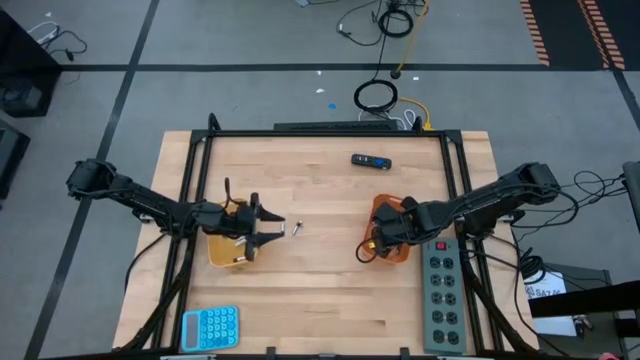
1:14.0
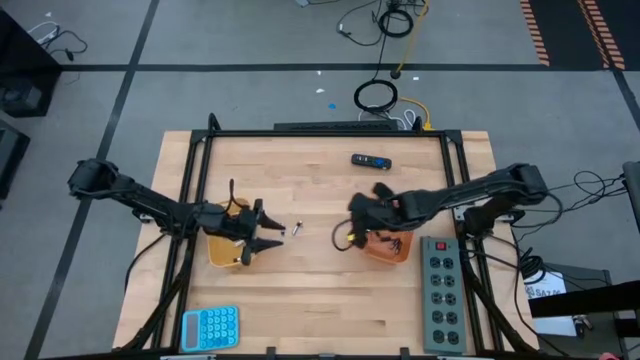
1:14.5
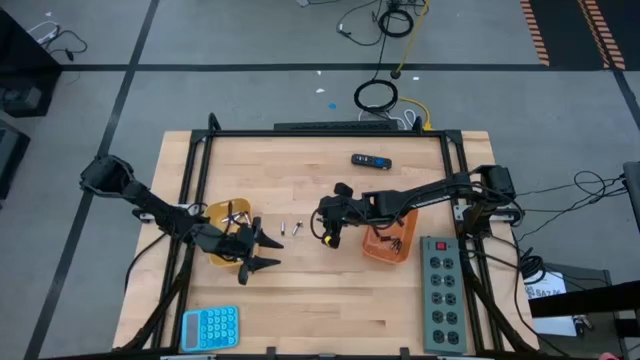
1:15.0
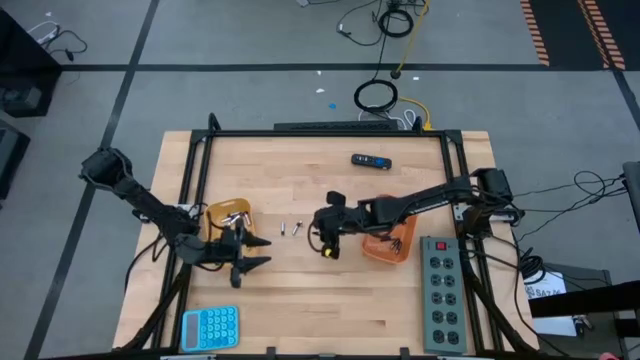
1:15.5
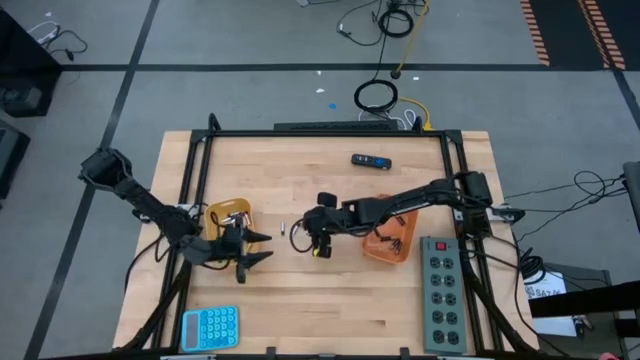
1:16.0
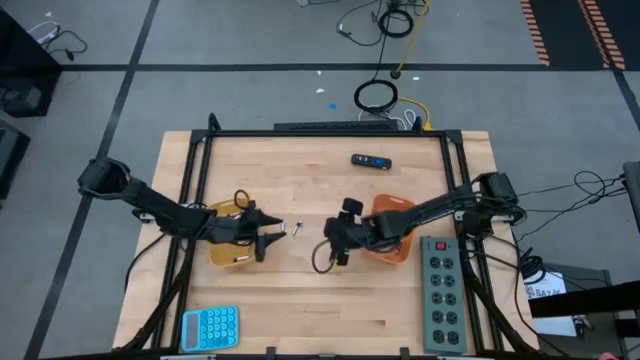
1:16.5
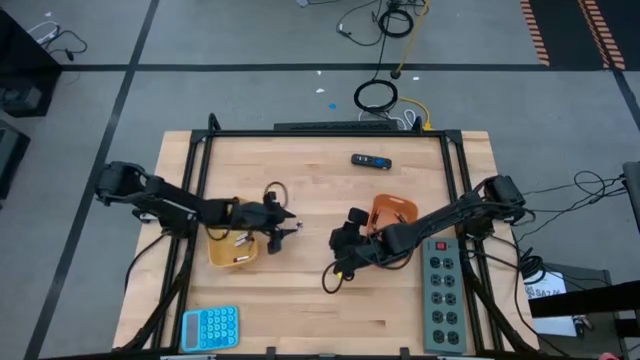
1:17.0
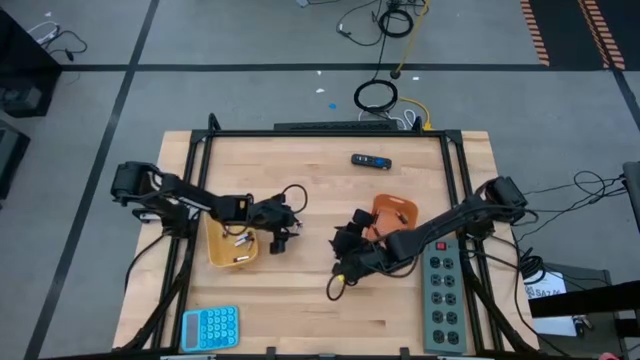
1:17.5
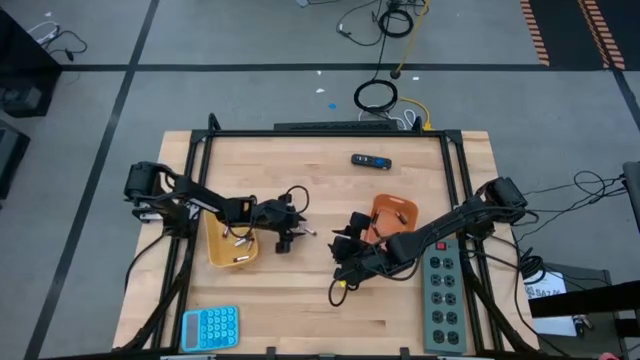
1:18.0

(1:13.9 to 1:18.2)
Task: Sort batteries
Put the silver battery into the yellow bin

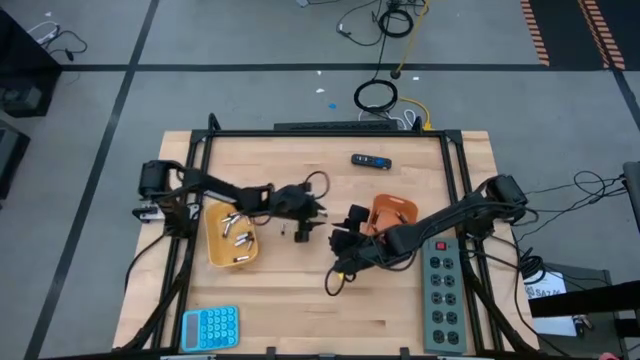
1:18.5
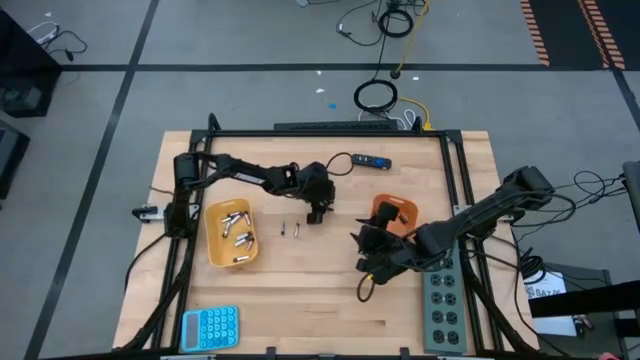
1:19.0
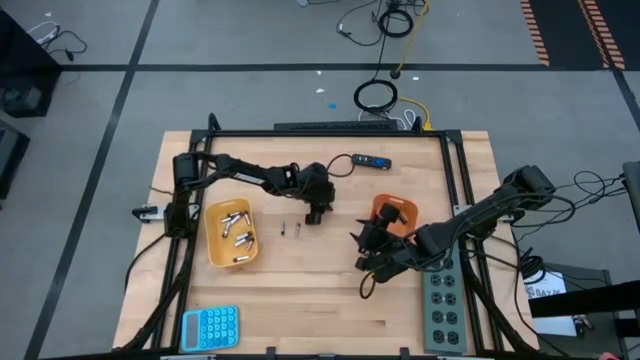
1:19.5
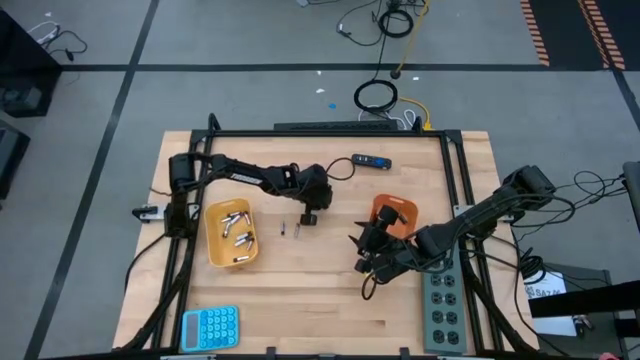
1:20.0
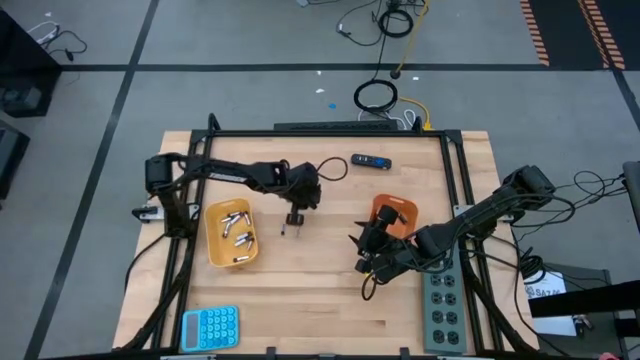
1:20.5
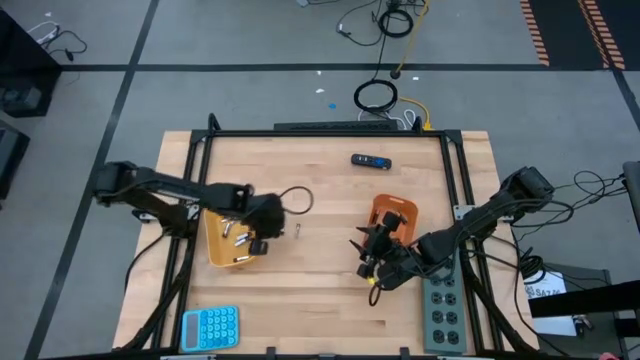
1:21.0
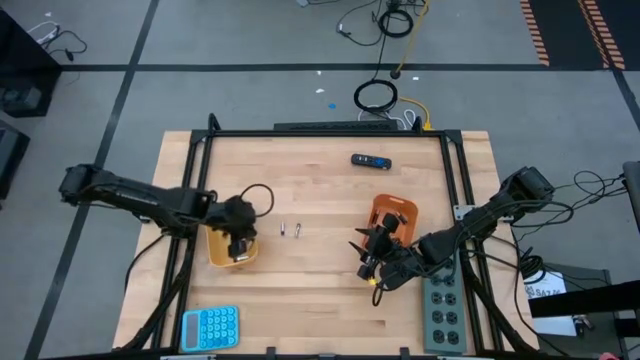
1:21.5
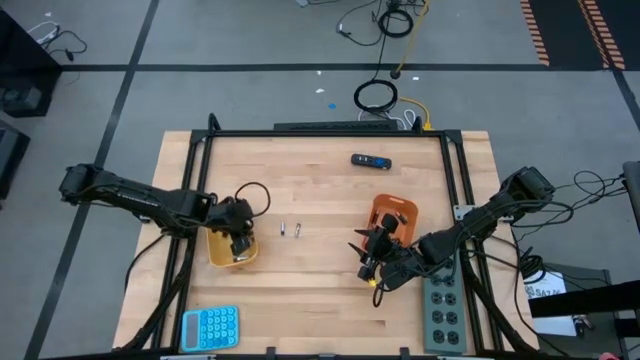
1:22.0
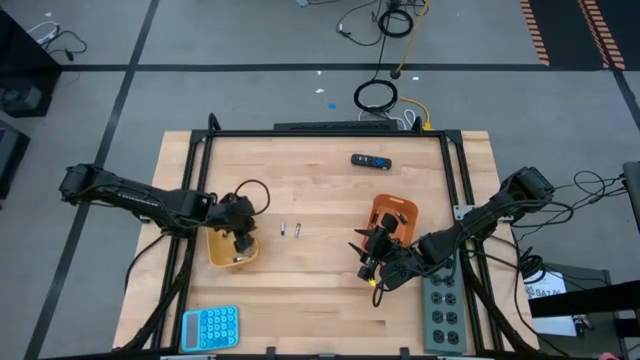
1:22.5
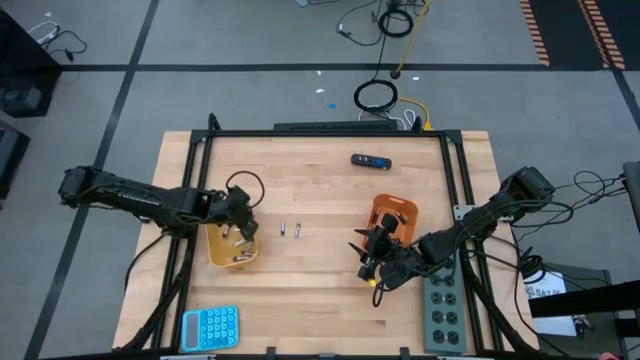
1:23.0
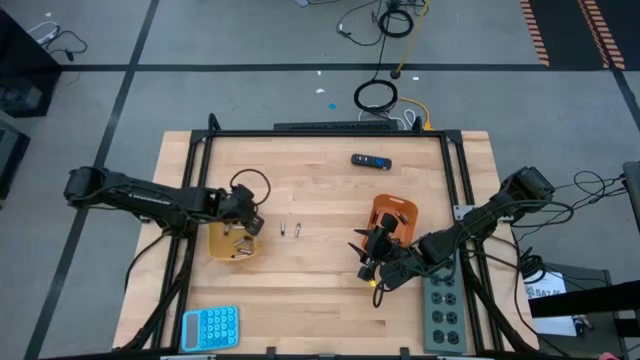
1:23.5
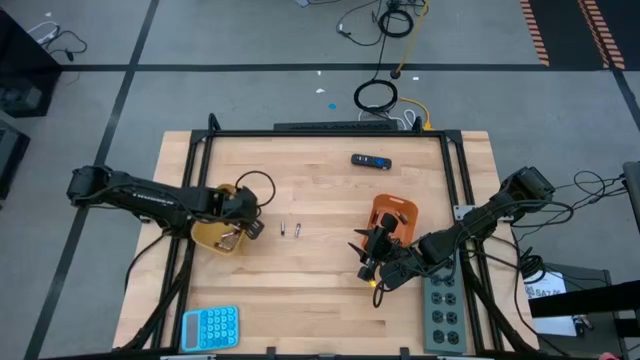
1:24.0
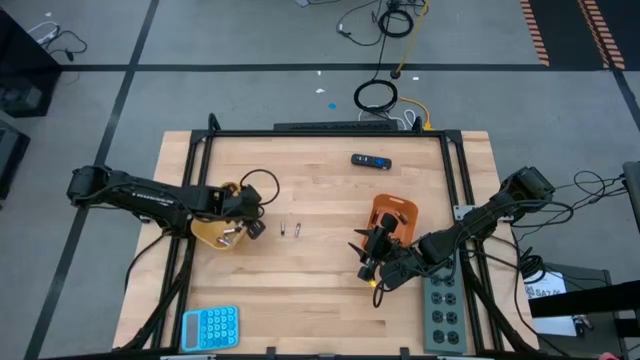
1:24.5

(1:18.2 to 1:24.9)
Put the silver battery into the yellow bin

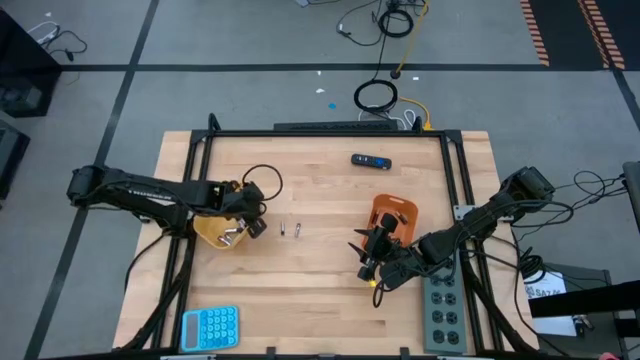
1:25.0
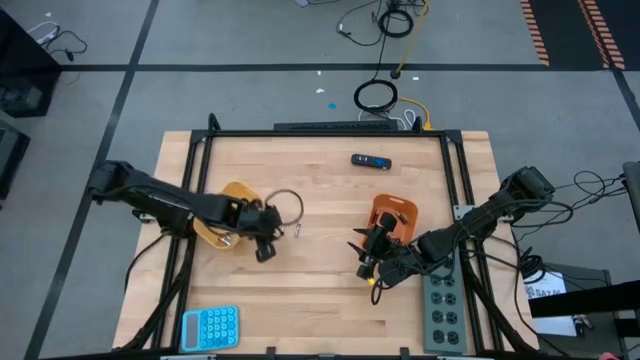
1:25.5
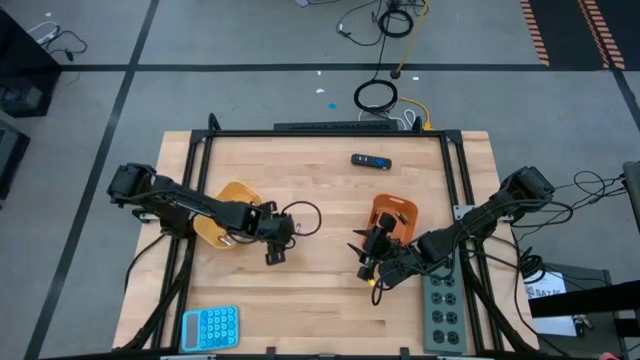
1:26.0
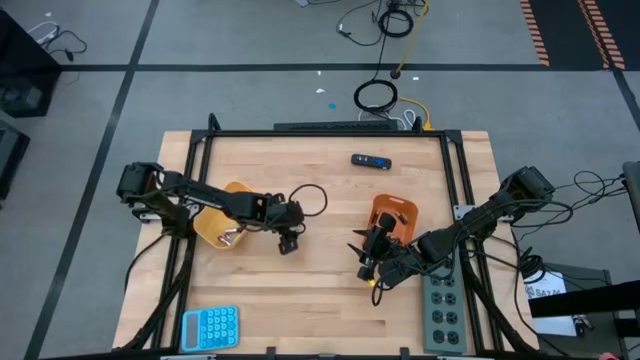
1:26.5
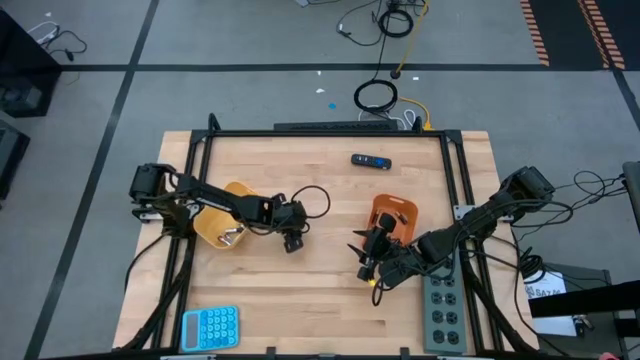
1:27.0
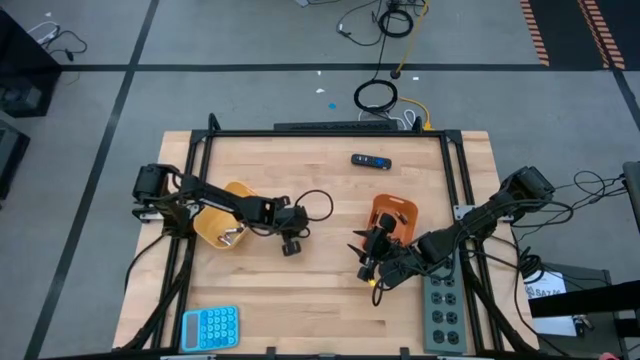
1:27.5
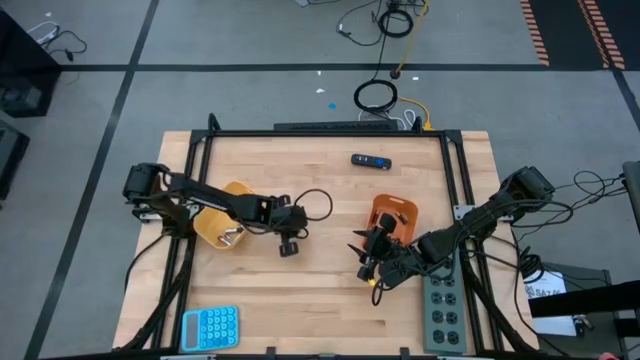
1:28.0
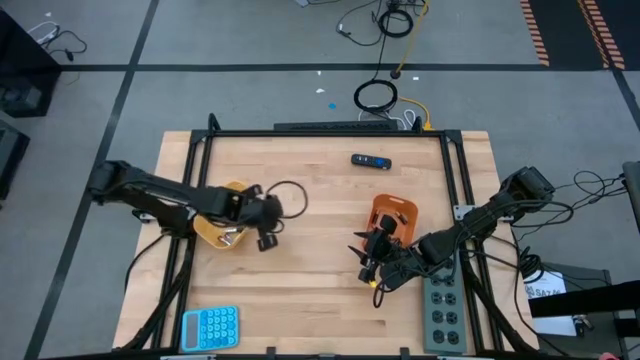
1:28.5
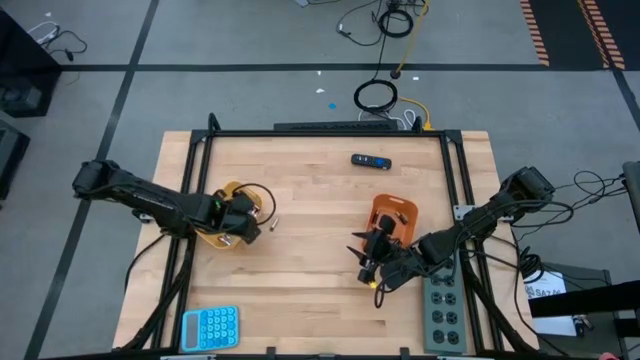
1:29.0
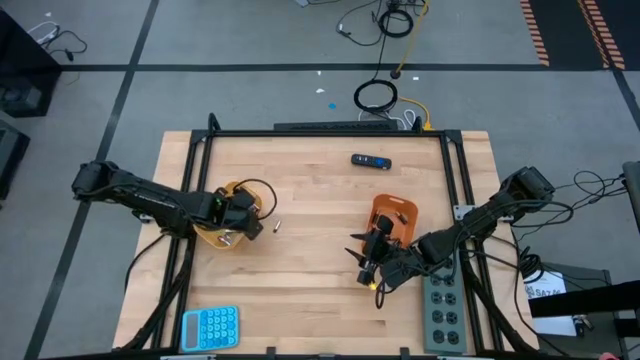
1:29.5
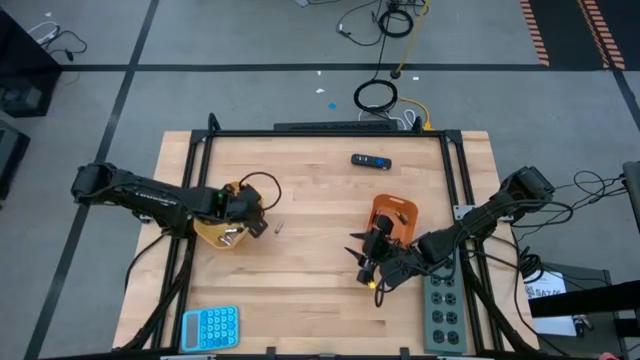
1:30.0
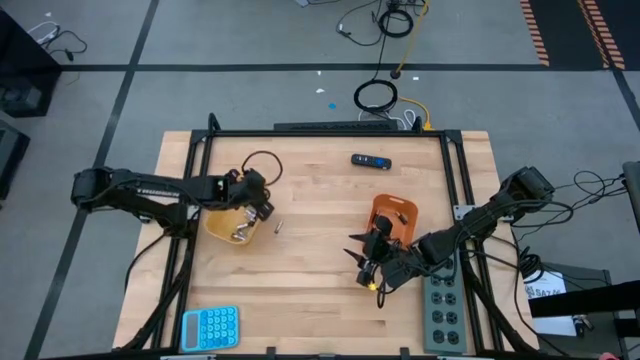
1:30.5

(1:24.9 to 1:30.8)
Put the silver battery into the yellow bin

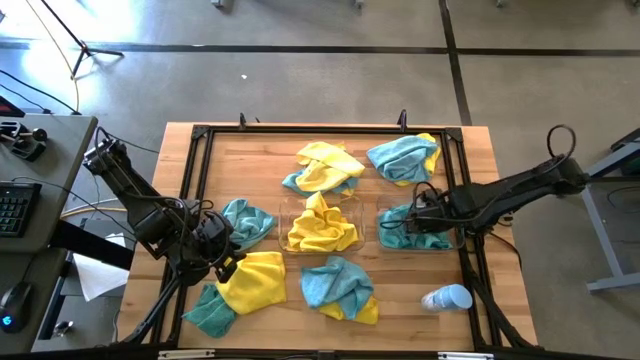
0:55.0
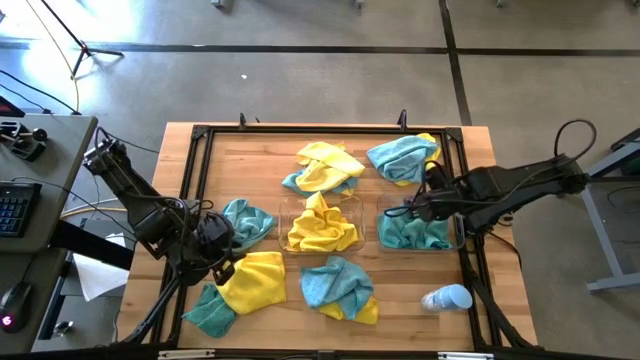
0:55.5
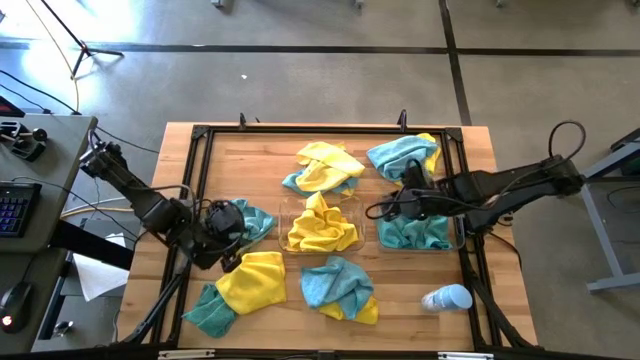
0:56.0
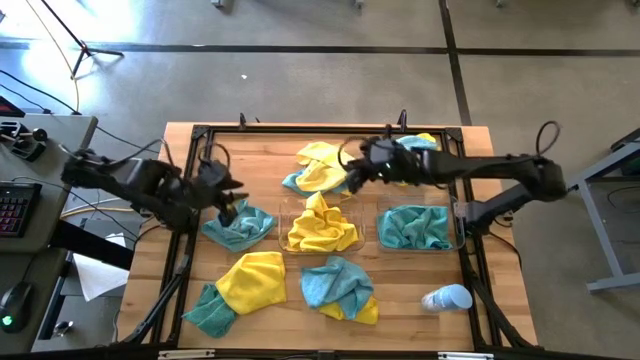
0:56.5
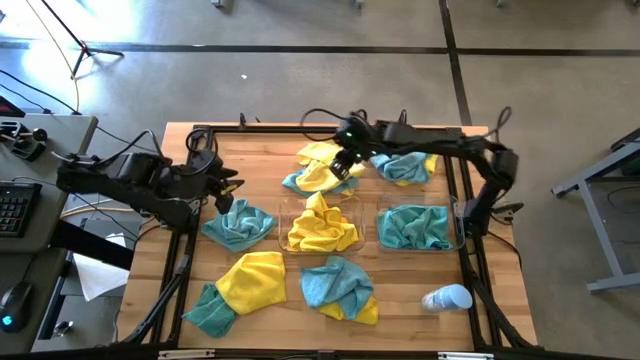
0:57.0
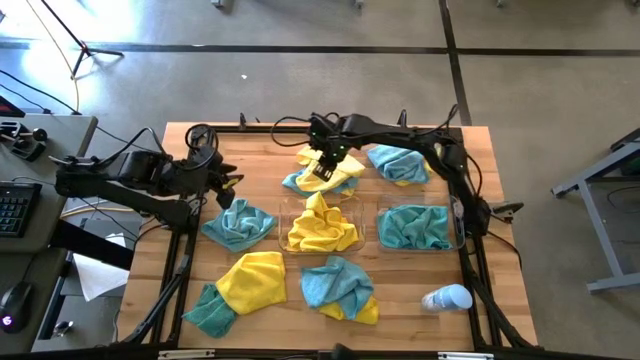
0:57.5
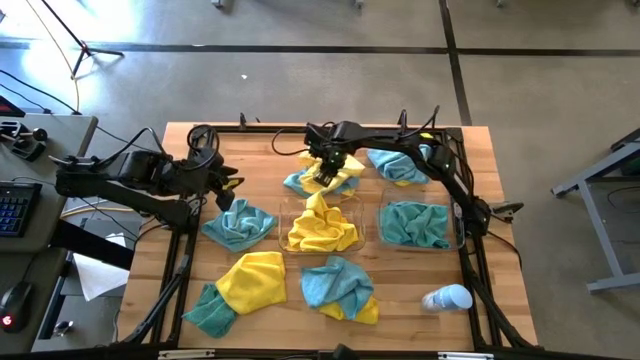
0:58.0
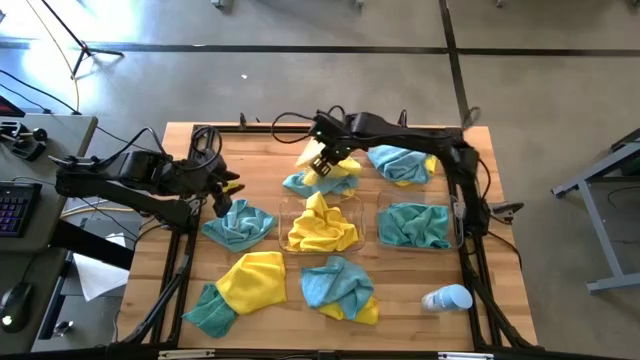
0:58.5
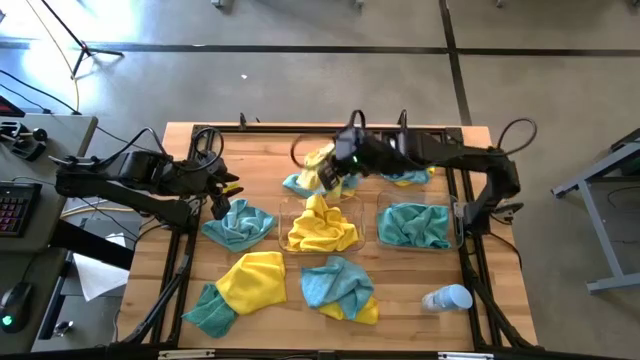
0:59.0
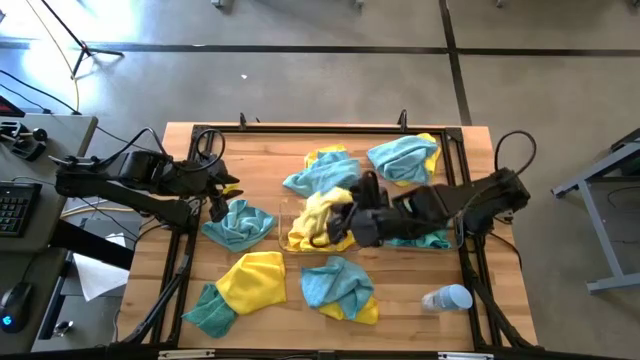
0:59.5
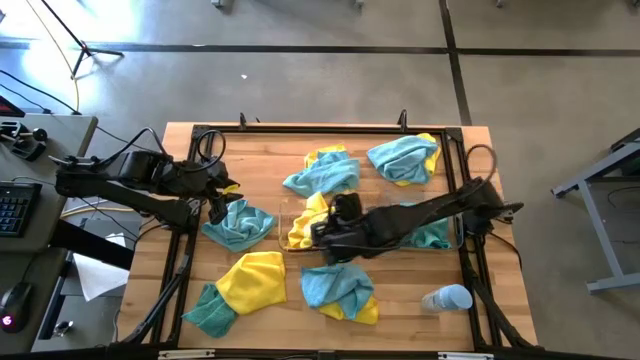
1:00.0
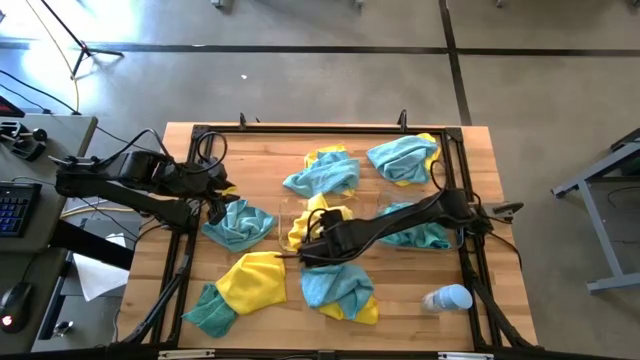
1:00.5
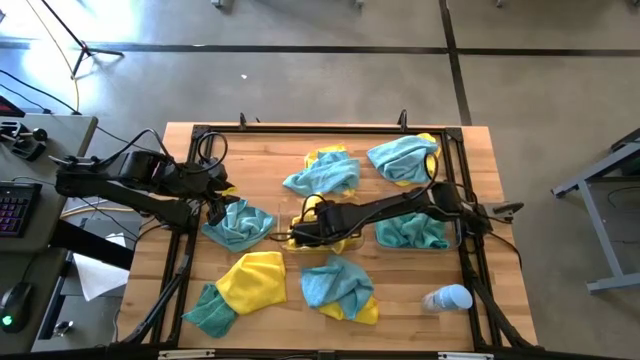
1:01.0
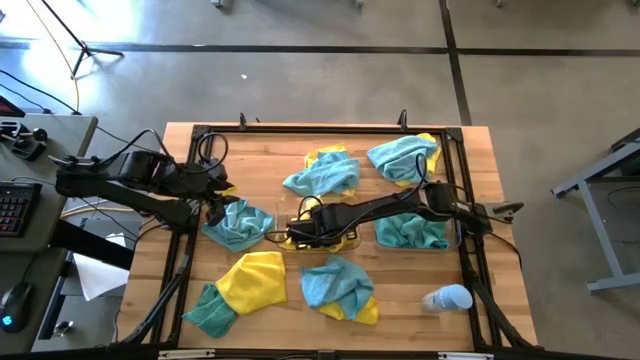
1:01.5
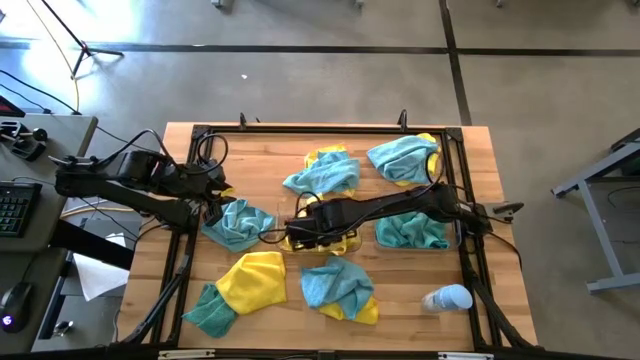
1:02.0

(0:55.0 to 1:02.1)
Task: Sort microfiber towel by color & place in baskets
Put the yellow microfiber cloth into the left transparent bin
